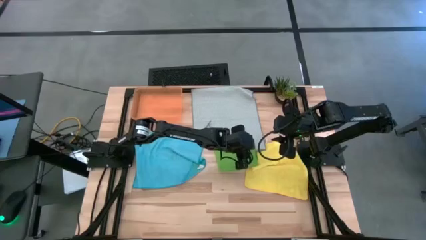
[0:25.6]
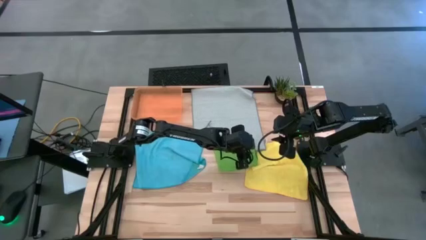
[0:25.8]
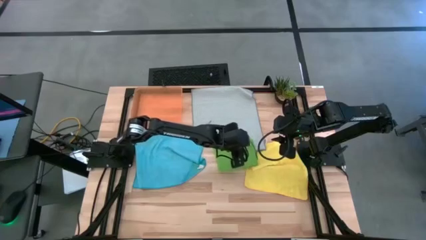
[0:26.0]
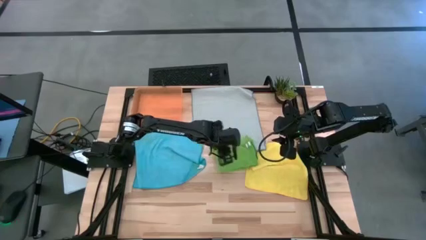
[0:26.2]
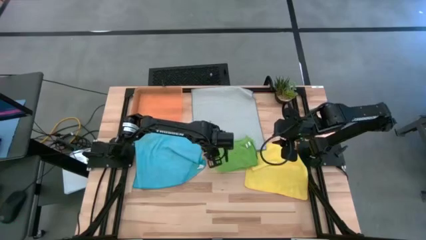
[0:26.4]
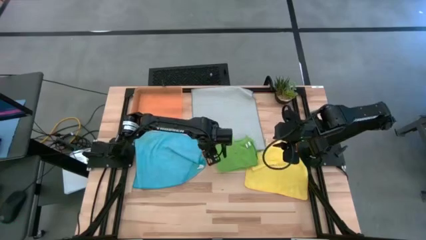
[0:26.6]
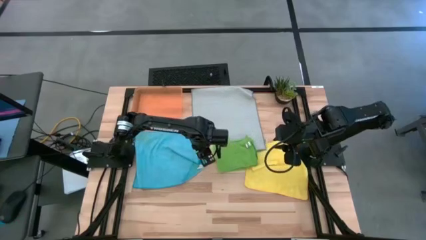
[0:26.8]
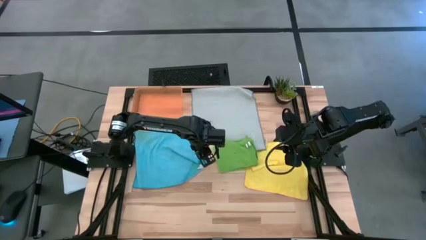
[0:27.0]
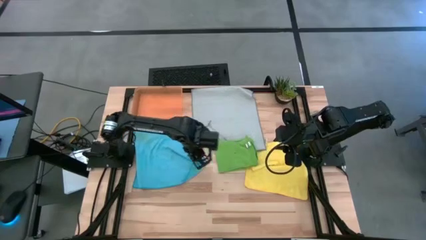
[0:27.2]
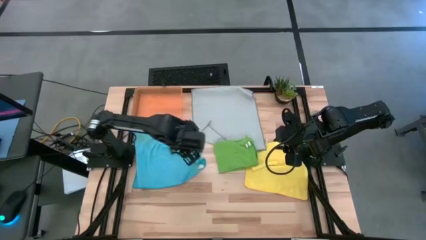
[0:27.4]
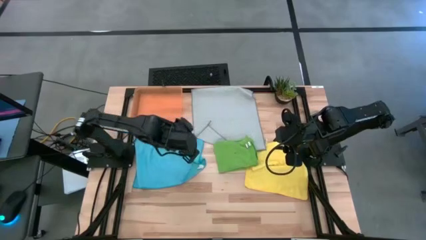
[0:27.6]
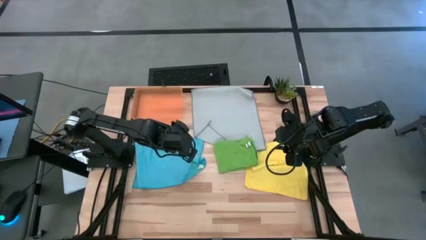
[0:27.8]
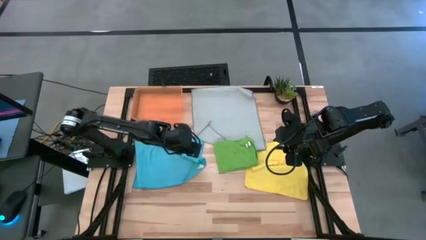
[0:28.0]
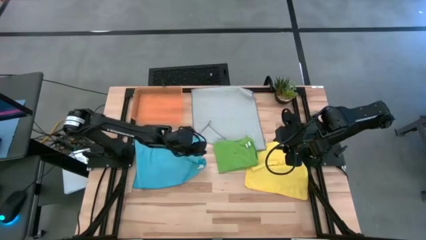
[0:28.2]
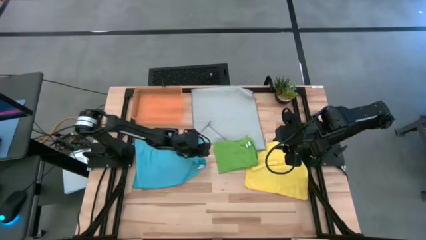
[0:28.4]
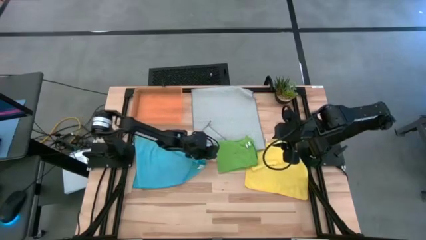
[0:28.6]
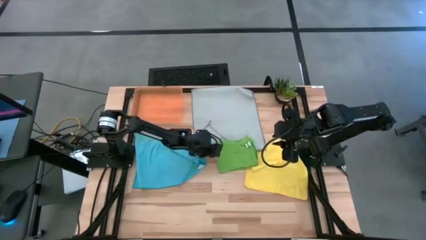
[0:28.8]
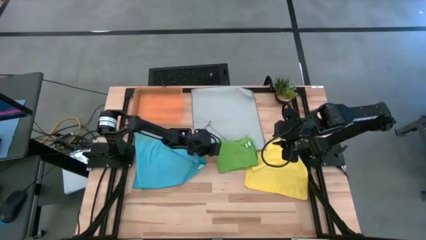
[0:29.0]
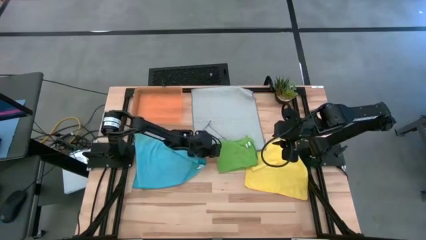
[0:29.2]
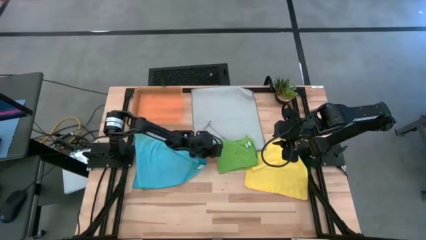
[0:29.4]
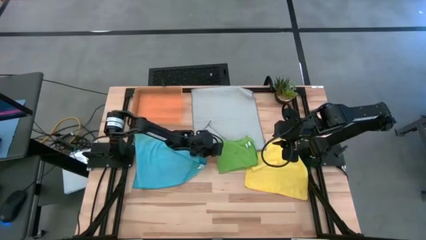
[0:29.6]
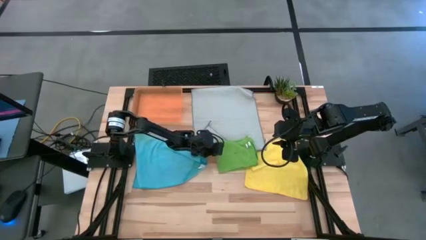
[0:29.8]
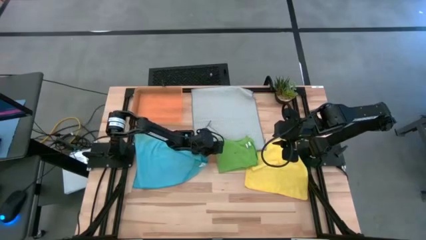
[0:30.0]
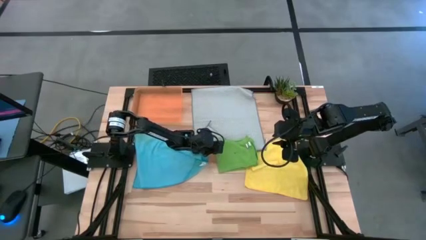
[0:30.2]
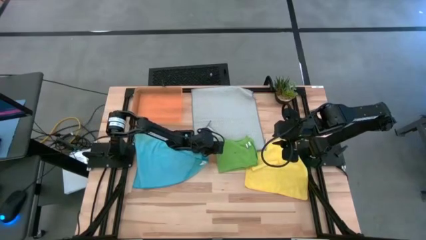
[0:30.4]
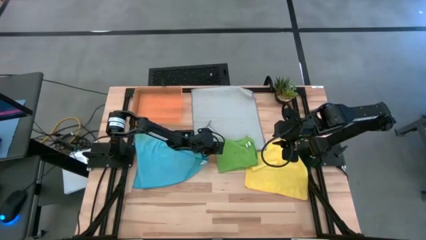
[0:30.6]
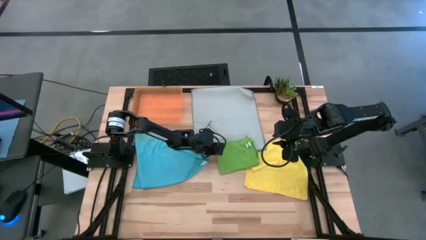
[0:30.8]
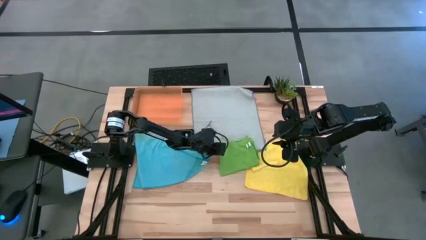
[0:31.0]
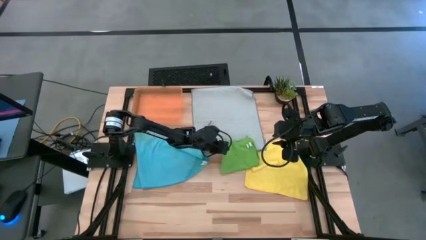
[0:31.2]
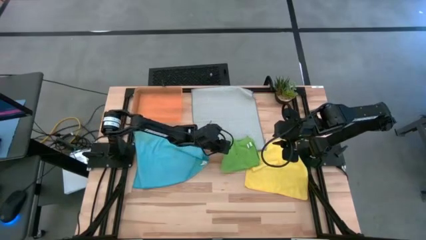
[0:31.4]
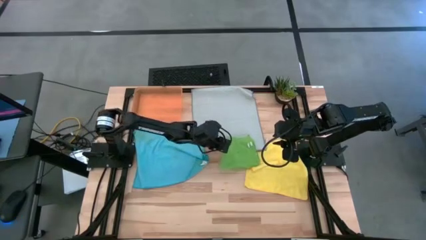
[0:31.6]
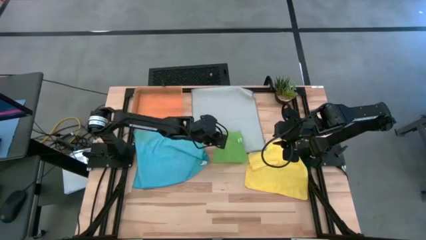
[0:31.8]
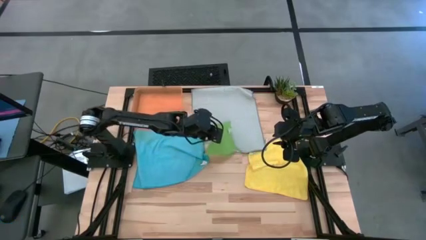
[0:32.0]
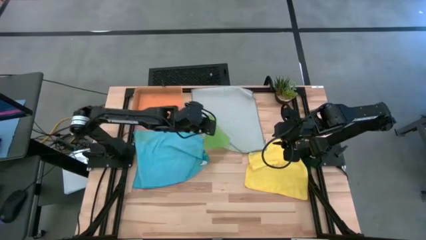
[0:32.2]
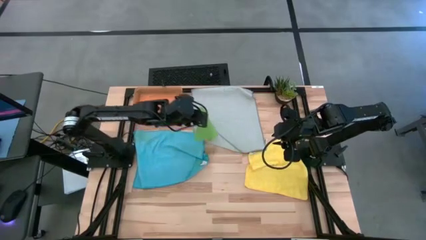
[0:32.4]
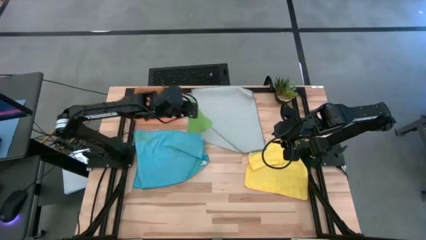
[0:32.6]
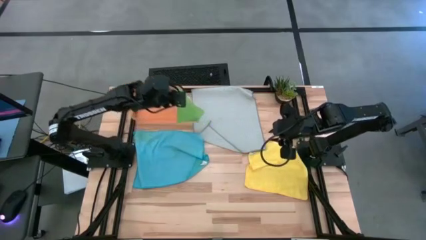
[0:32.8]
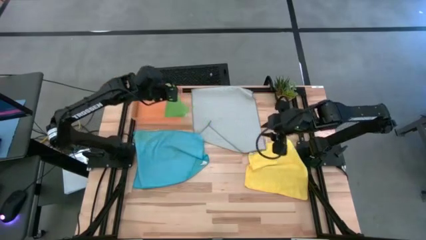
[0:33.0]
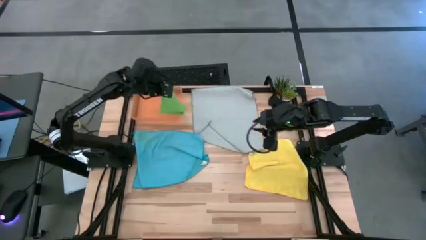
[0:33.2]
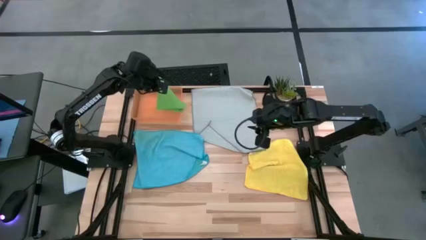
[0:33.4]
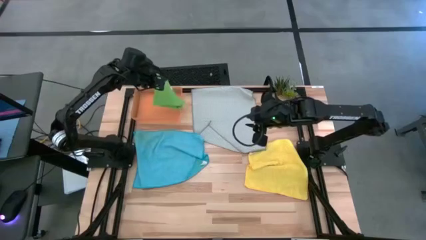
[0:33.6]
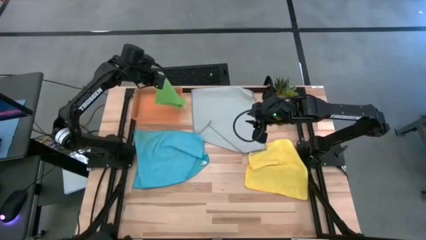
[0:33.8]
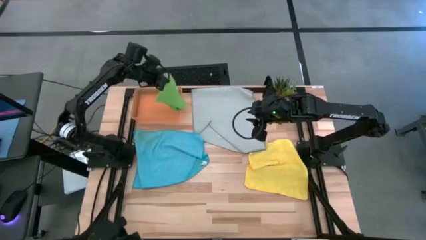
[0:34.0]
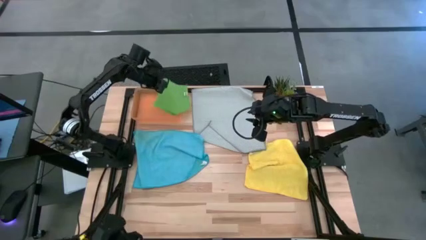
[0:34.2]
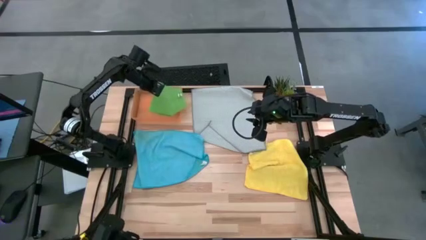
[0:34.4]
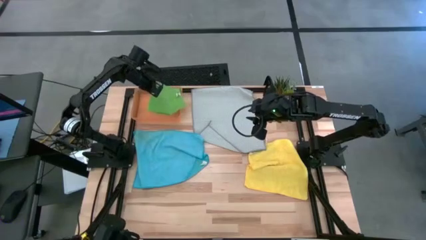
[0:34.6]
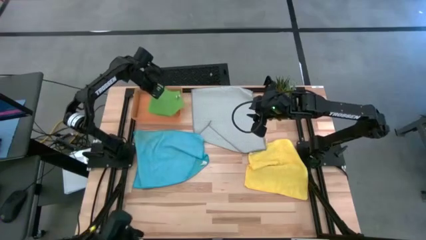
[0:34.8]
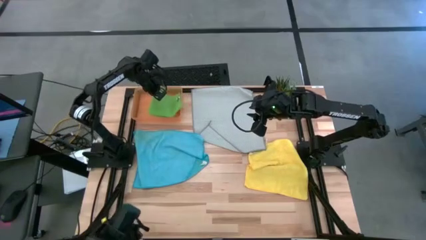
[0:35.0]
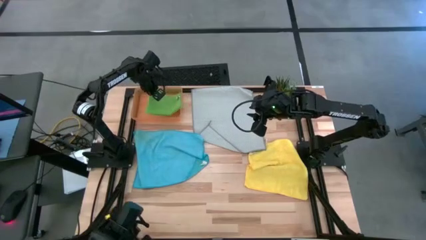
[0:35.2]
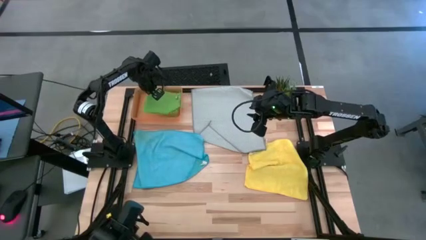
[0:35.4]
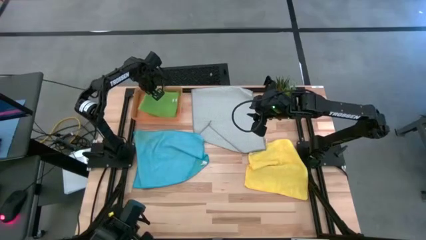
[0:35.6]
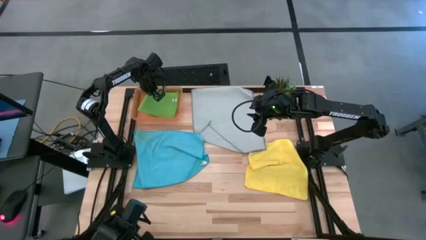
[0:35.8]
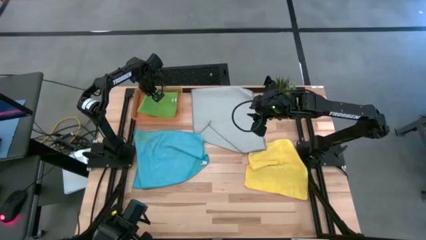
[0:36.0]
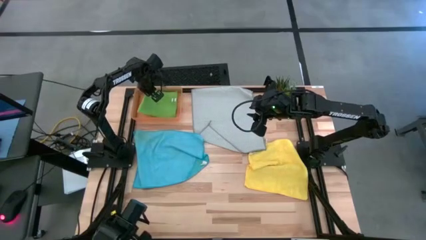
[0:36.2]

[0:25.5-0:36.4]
Task: Fold microfiber towels
Put the green microfiber towel into the orange bin
